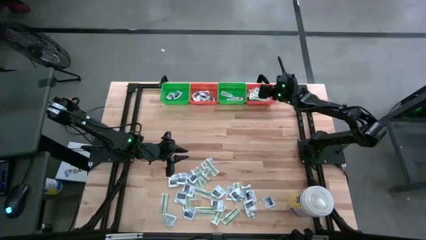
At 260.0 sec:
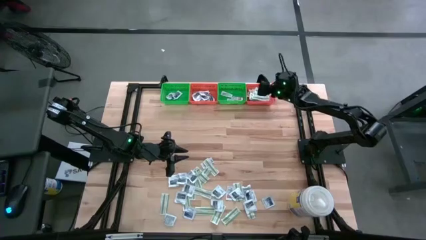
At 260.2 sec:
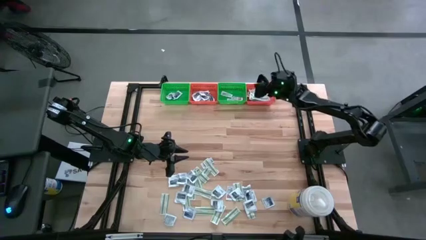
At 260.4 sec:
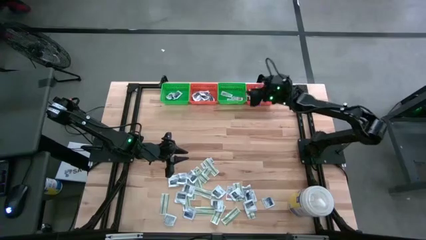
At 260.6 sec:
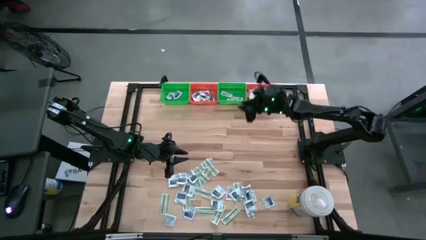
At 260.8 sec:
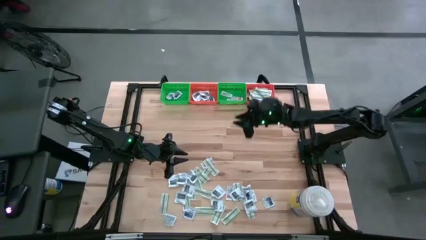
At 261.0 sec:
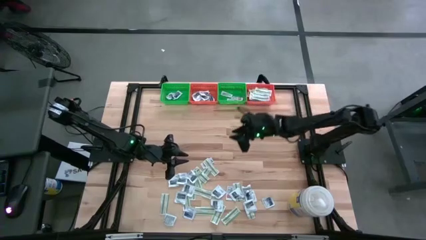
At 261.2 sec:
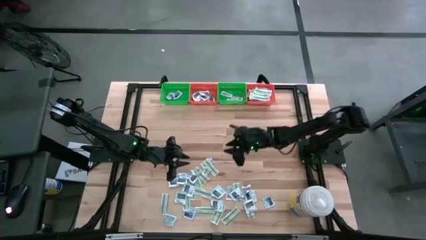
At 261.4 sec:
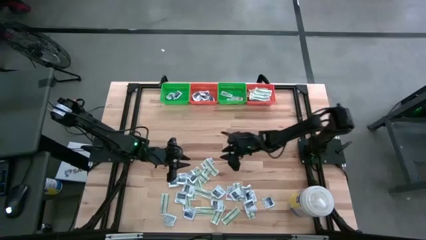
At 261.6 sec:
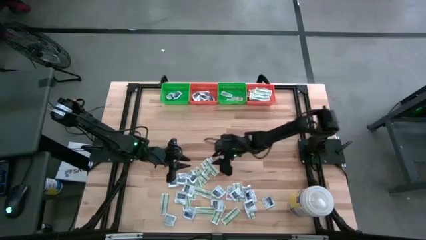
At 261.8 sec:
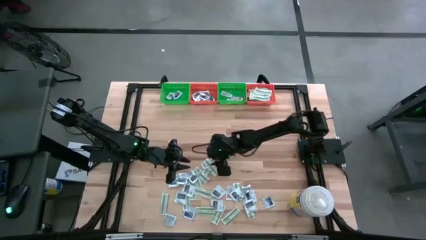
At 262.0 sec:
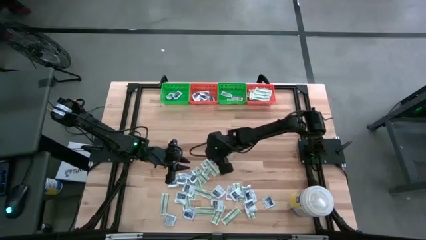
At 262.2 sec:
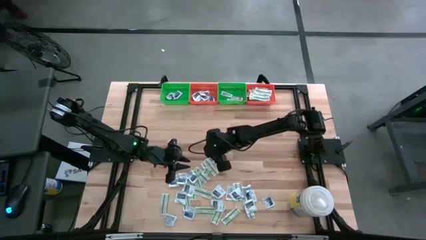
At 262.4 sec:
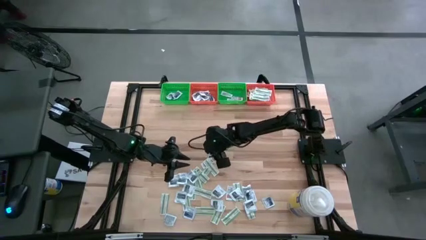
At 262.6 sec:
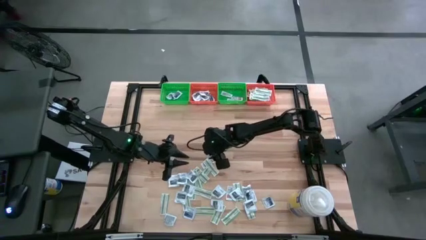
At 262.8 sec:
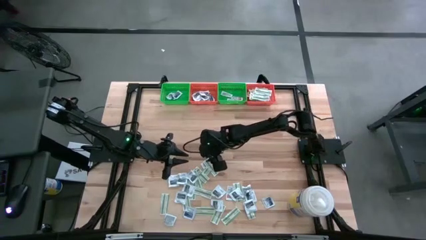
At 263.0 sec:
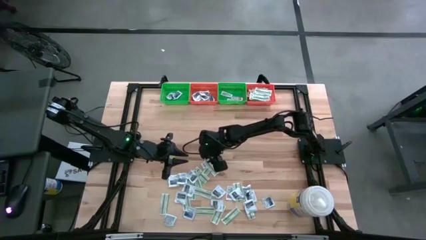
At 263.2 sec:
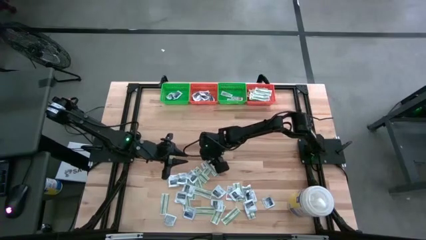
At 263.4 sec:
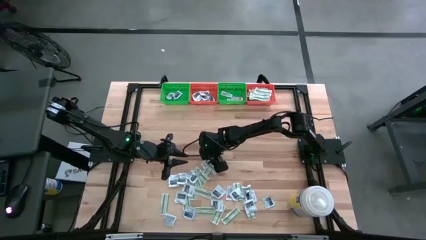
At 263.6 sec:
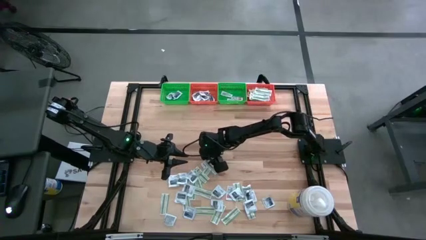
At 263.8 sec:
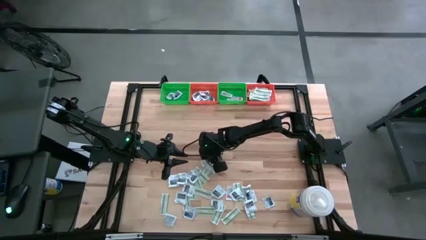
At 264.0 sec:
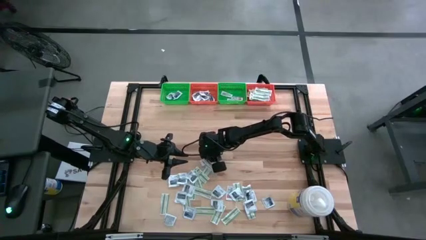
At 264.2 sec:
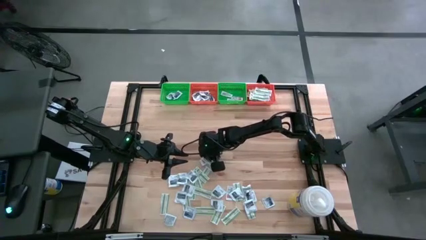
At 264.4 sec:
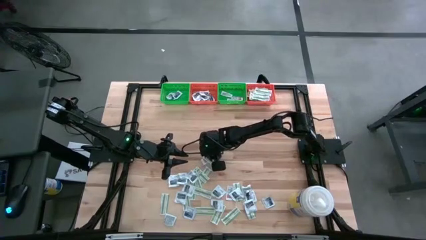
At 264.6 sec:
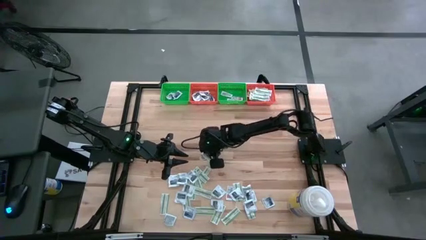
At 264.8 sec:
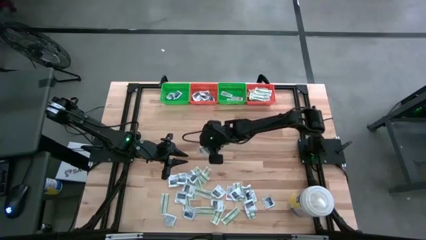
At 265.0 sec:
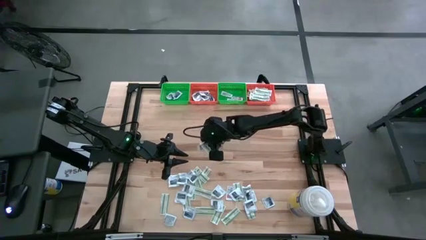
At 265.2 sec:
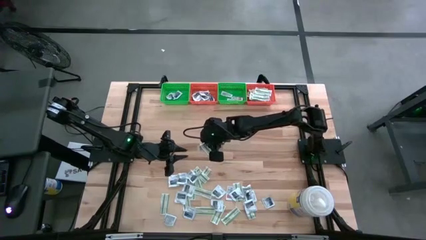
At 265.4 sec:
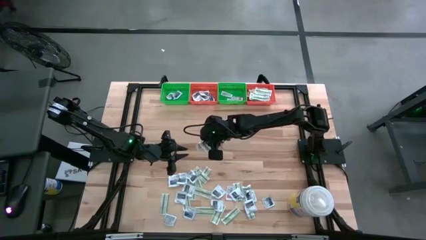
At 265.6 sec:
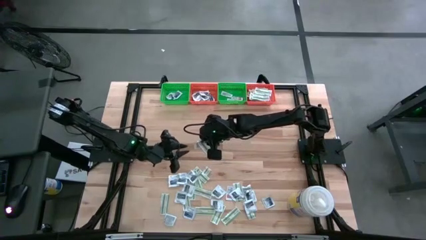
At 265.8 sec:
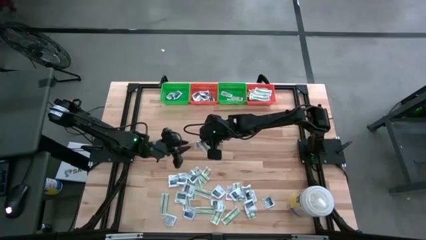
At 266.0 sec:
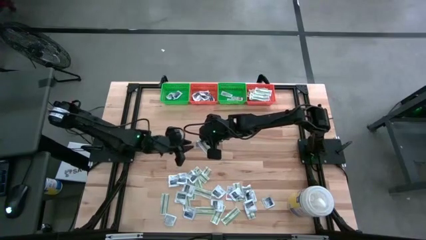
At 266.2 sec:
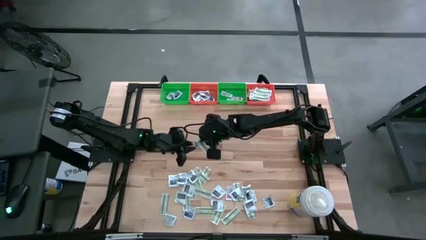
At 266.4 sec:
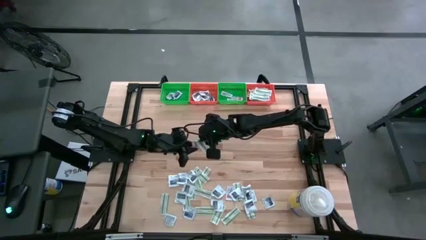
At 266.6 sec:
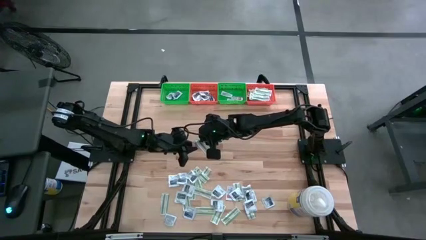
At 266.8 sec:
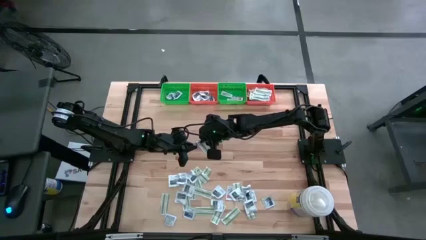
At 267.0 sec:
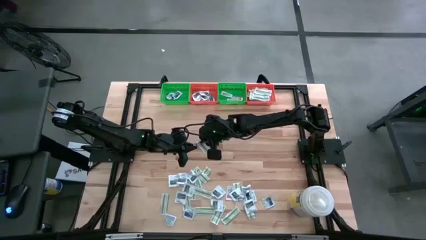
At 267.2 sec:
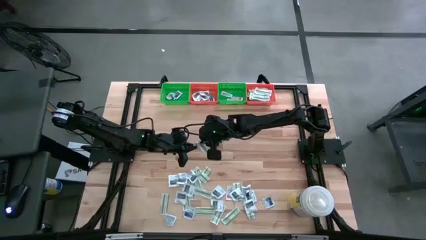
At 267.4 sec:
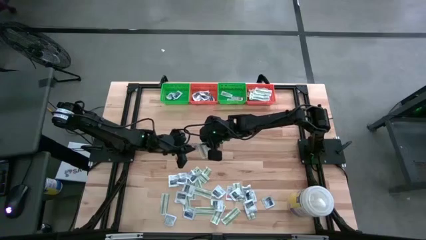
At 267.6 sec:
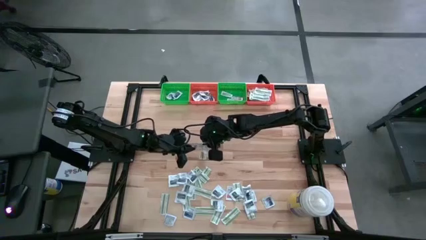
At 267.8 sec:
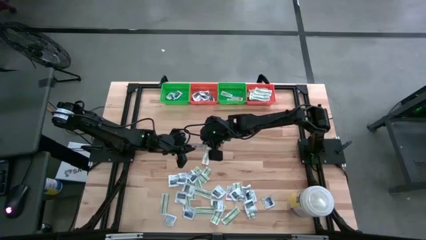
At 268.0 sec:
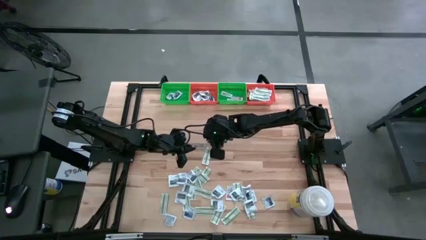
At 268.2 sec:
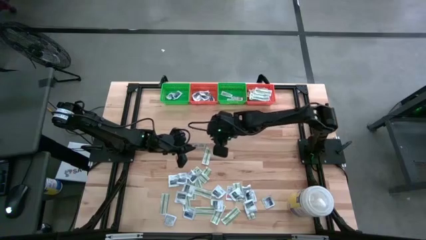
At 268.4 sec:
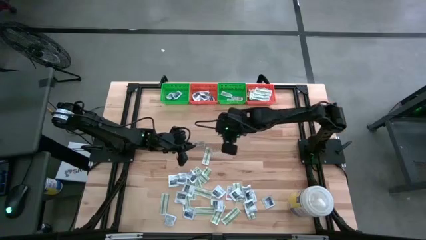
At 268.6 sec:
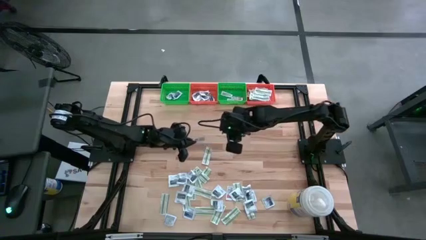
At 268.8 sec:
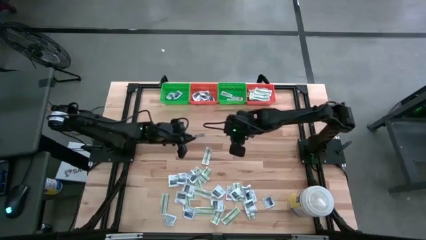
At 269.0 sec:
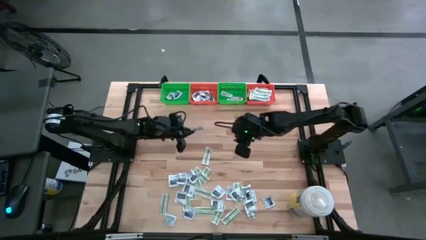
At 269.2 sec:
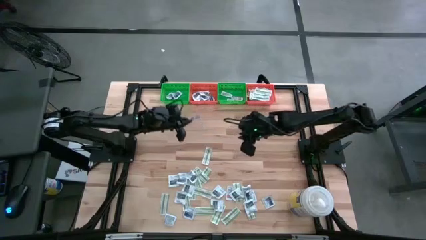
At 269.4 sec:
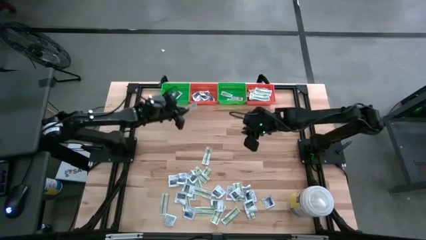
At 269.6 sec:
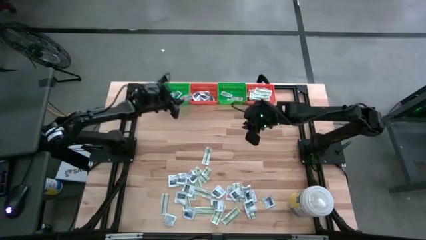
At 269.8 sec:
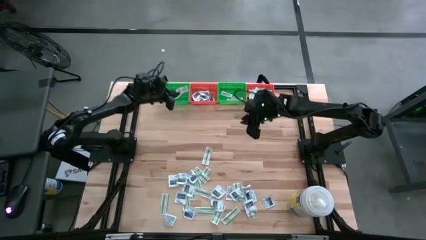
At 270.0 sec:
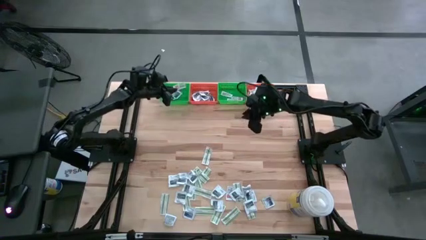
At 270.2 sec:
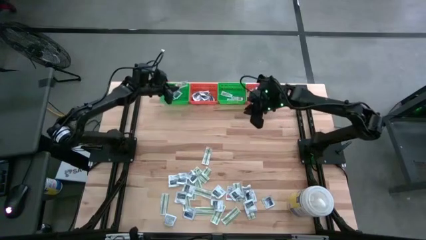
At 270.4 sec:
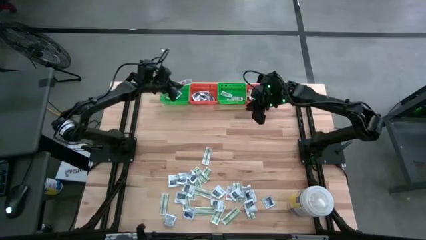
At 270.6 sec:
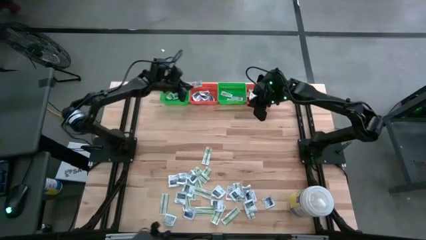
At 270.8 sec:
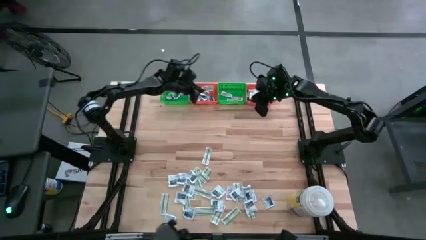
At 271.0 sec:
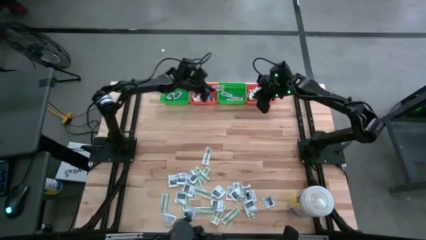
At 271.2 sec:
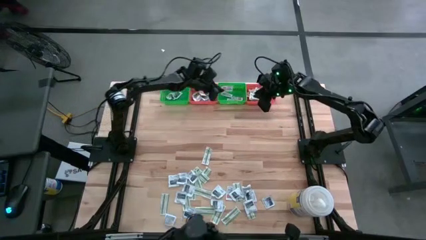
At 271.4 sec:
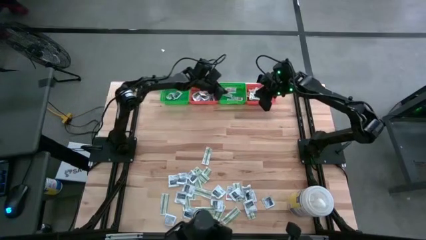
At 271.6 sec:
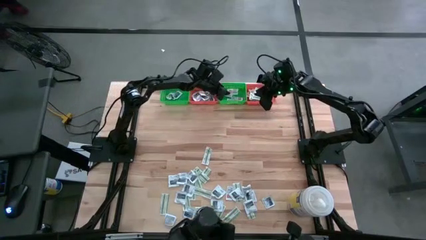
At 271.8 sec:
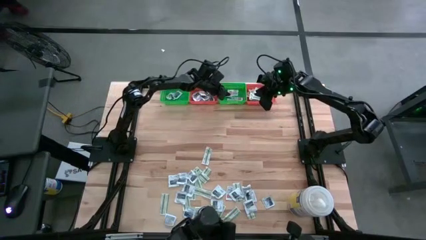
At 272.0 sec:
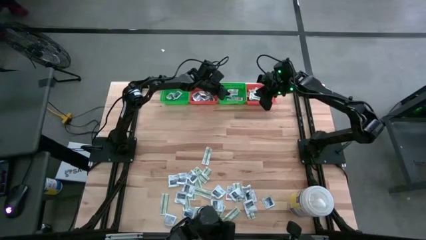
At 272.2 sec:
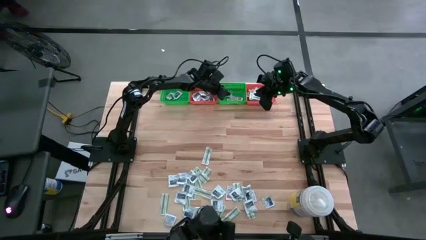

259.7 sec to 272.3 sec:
Task: Pick & Place First Aid Supplies
Put the orange ointment pack in the right green bin

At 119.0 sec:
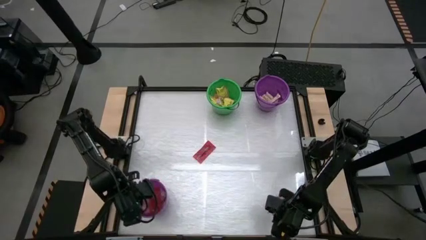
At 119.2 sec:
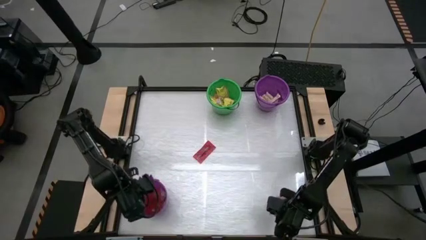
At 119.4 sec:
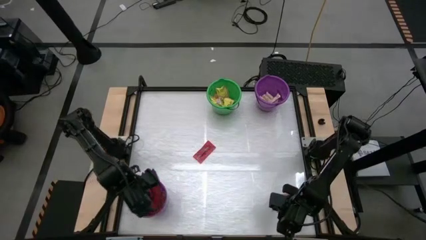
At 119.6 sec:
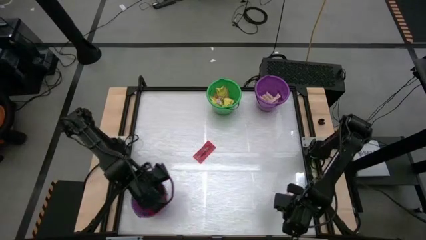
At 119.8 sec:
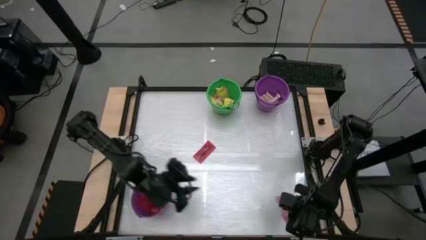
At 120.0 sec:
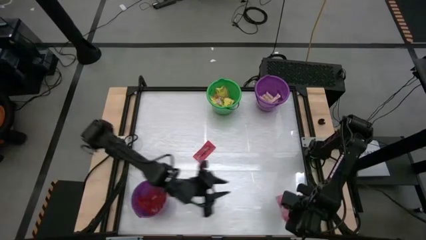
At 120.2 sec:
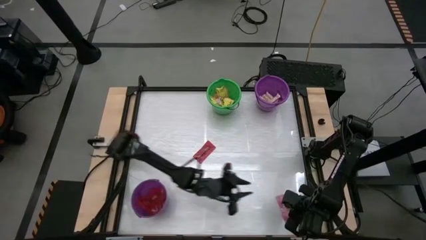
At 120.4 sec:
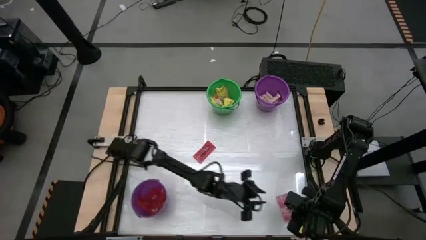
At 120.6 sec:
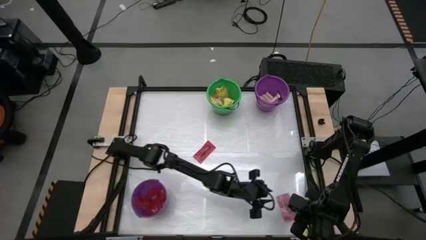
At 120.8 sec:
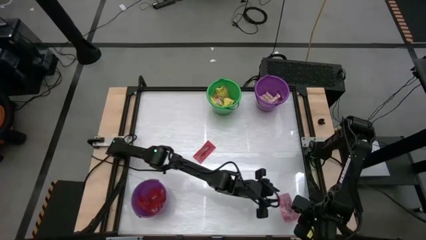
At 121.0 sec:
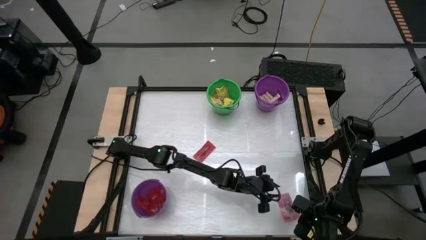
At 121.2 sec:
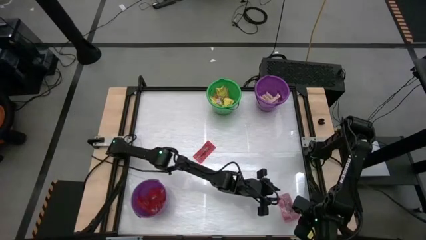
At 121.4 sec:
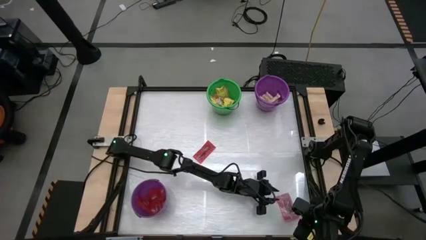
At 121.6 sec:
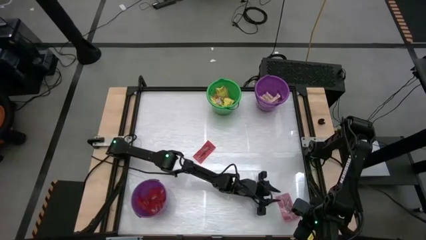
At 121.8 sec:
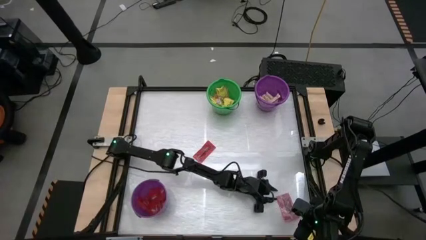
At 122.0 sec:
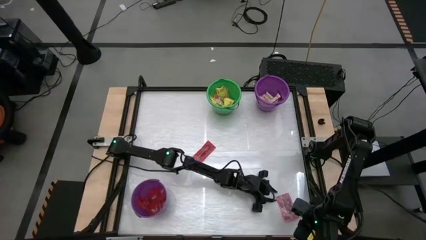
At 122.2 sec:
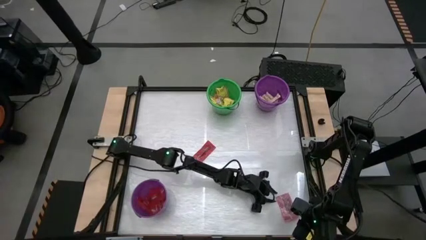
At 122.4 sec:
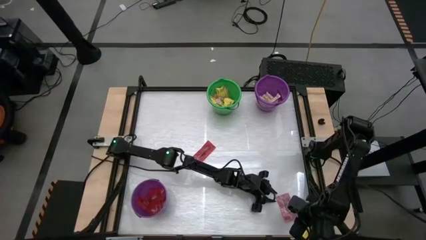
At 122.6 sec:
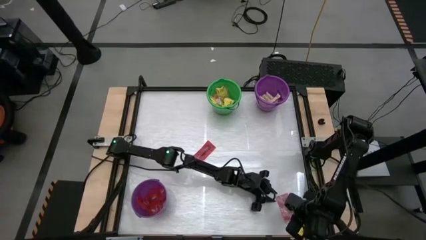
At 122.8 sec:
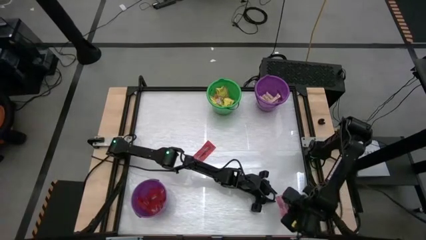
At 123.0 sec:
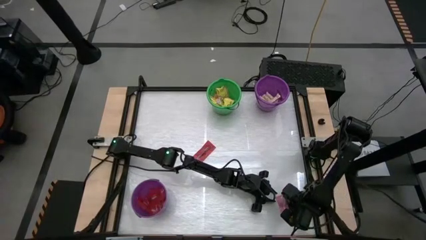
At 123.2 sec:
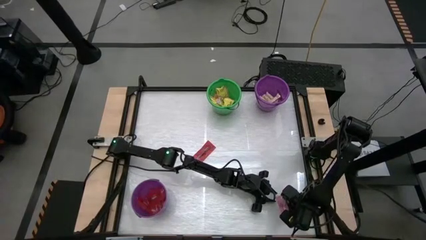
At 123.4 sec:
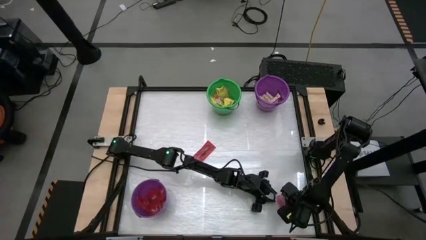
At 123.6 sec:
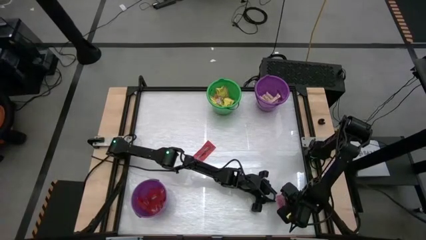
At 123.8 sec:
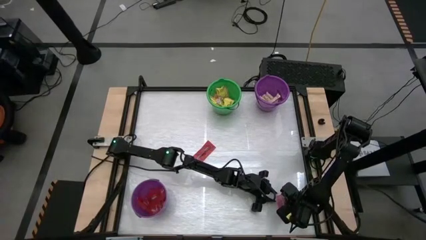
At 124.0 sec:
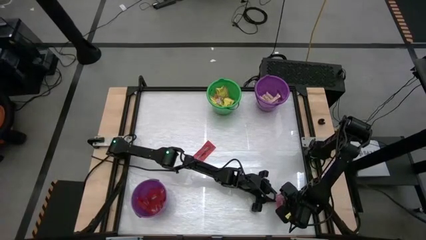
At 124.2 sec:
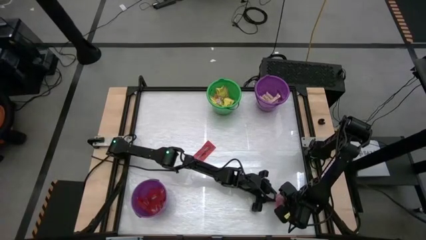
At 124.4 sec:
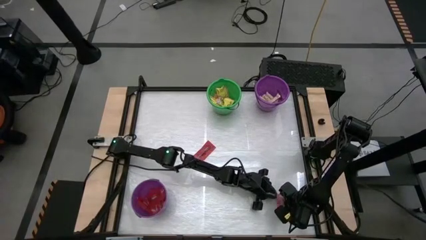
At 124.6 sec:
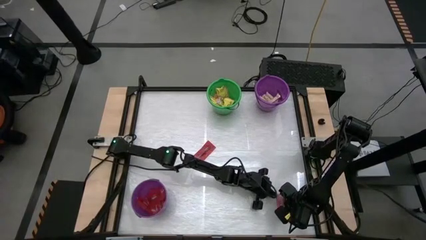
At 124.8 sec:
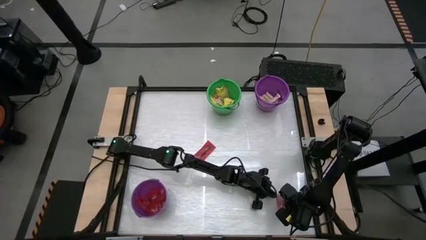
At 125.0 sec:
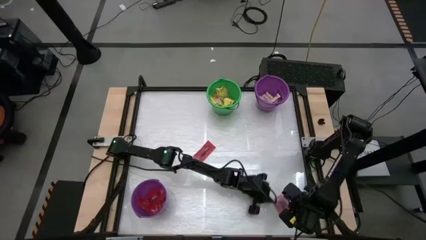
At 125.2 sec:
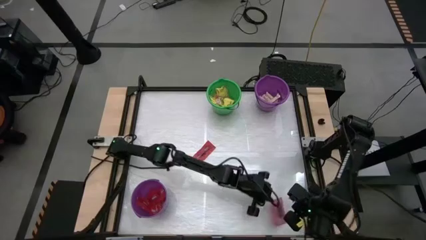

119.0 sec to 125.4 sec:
Task: Sort candy by brand, put in halloween buckets
Put the red candy into the bottom violet bucket
